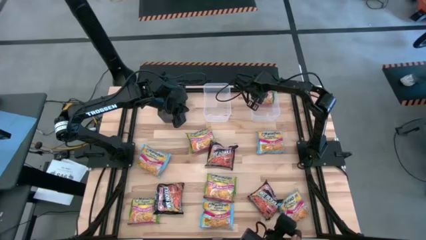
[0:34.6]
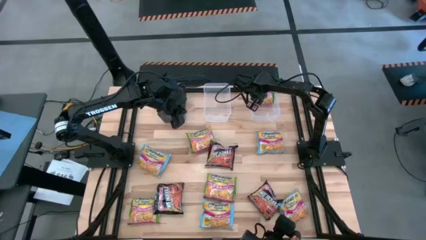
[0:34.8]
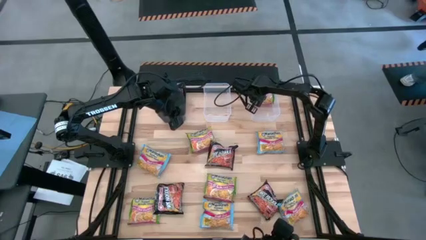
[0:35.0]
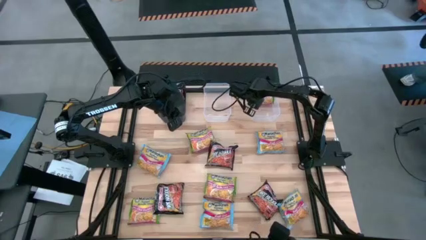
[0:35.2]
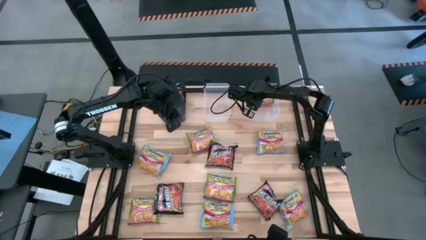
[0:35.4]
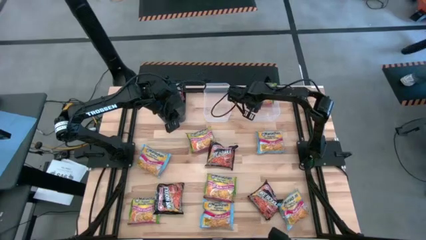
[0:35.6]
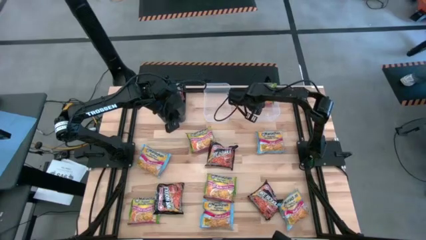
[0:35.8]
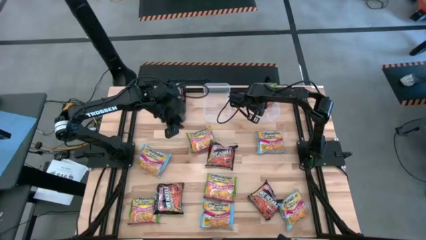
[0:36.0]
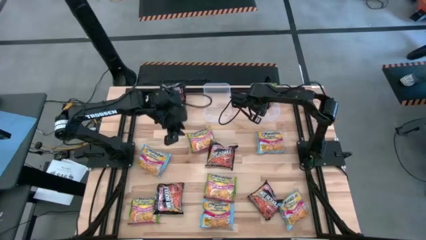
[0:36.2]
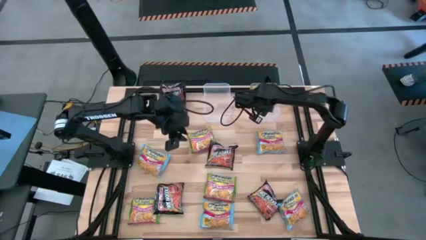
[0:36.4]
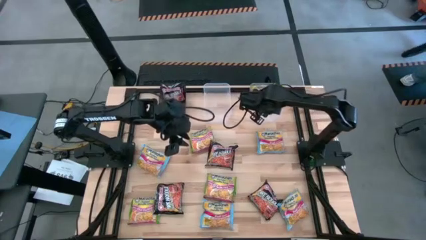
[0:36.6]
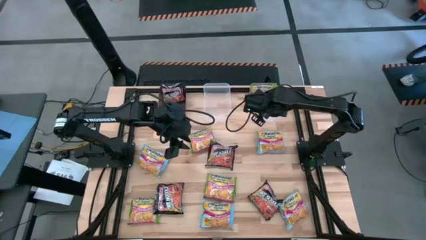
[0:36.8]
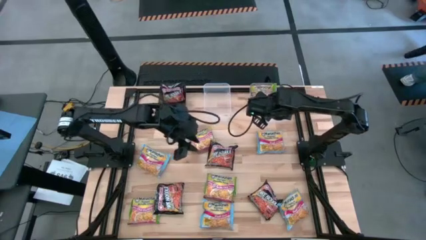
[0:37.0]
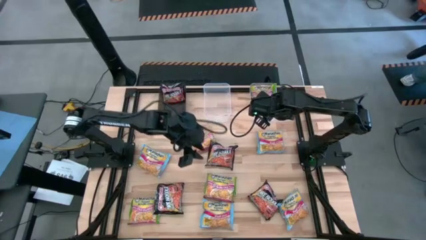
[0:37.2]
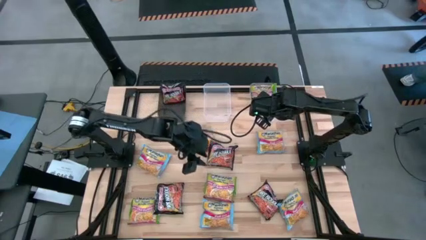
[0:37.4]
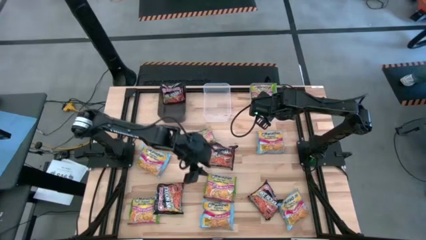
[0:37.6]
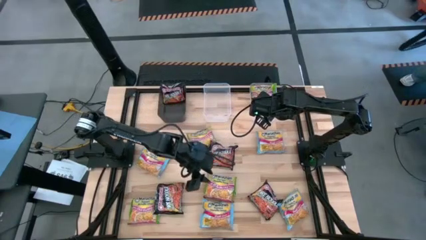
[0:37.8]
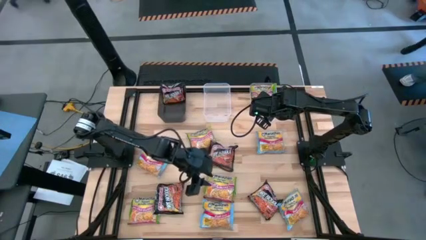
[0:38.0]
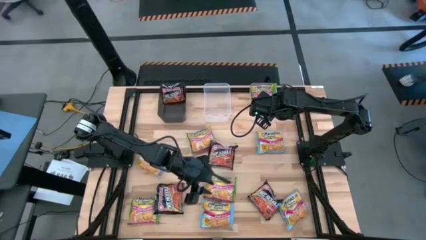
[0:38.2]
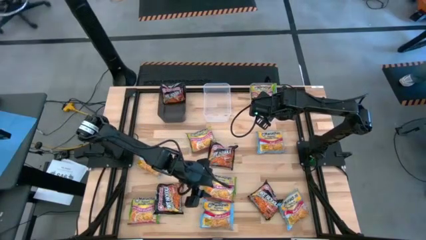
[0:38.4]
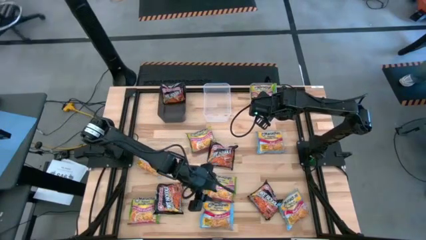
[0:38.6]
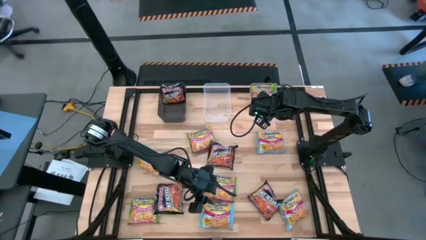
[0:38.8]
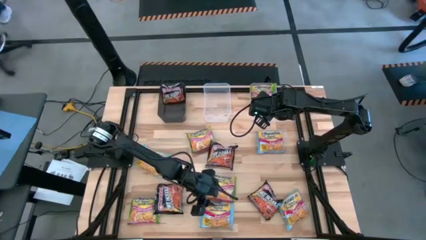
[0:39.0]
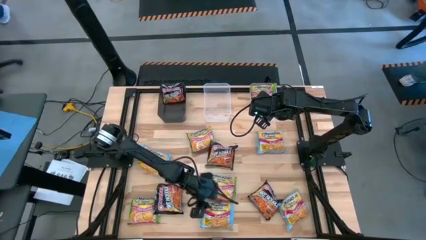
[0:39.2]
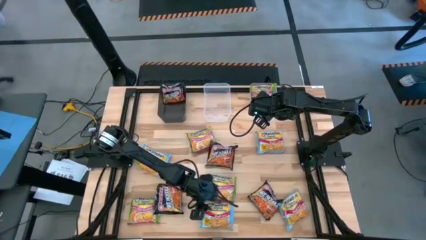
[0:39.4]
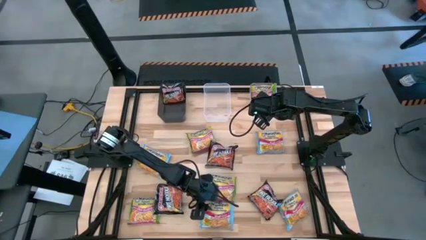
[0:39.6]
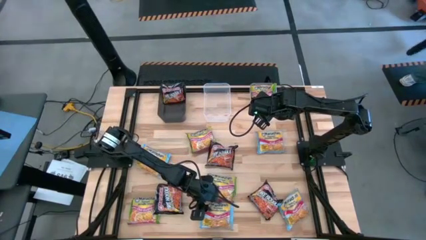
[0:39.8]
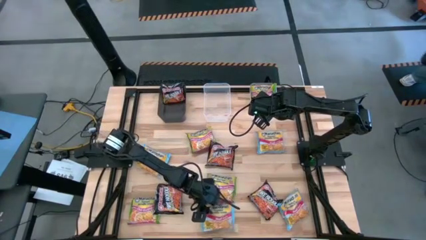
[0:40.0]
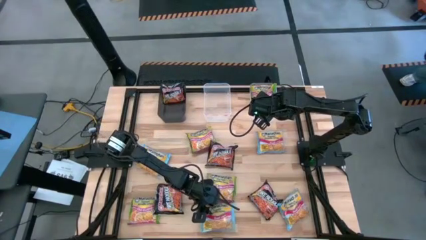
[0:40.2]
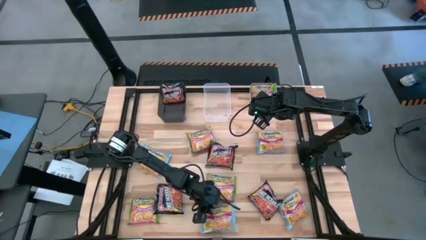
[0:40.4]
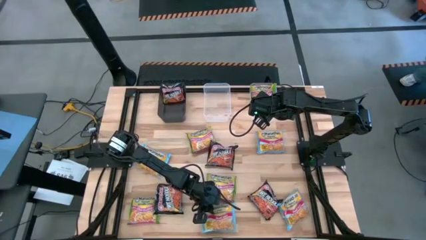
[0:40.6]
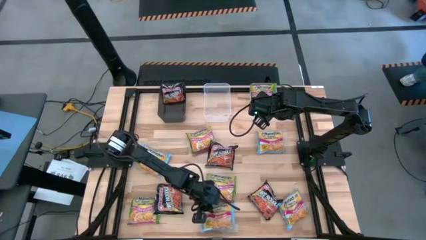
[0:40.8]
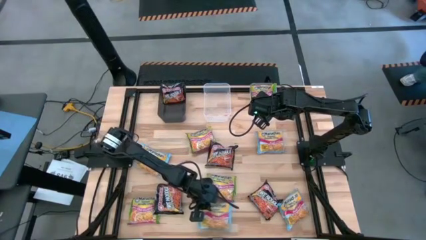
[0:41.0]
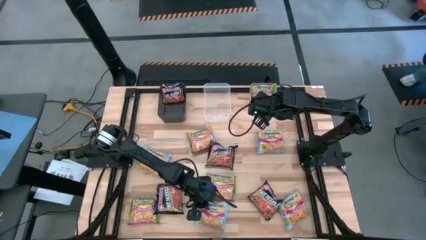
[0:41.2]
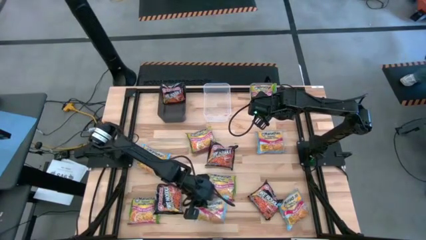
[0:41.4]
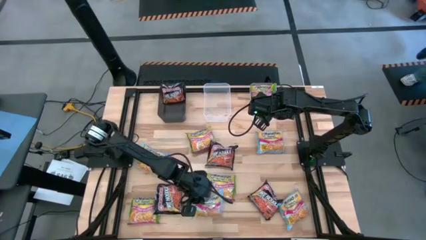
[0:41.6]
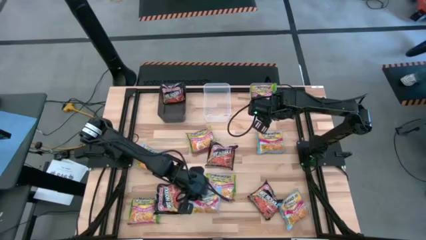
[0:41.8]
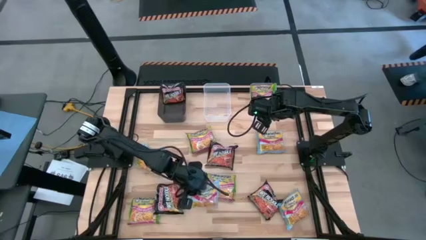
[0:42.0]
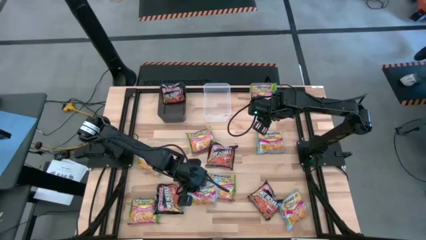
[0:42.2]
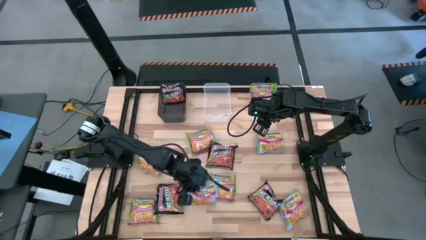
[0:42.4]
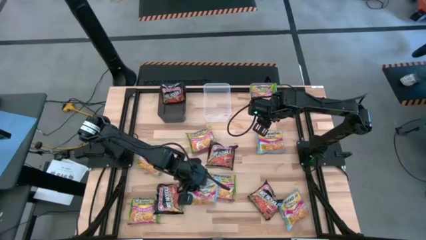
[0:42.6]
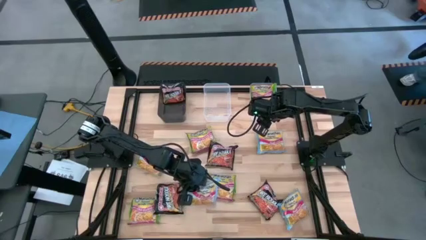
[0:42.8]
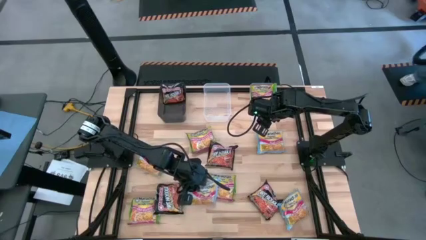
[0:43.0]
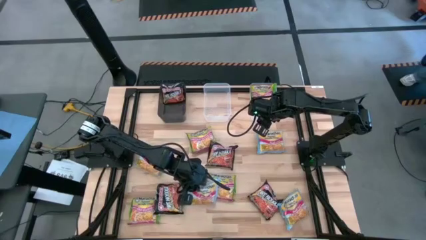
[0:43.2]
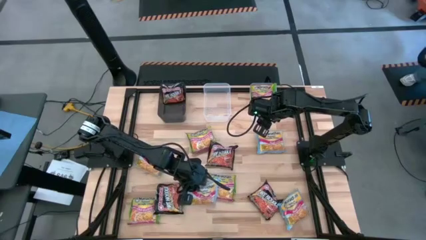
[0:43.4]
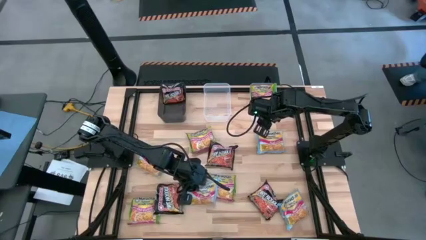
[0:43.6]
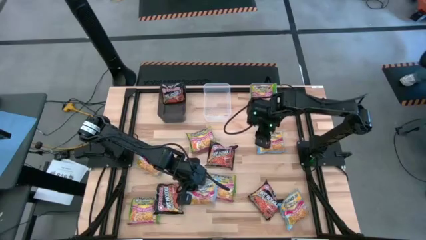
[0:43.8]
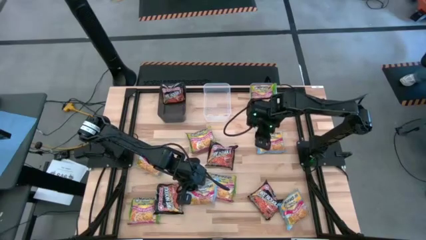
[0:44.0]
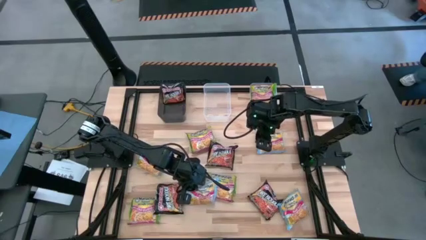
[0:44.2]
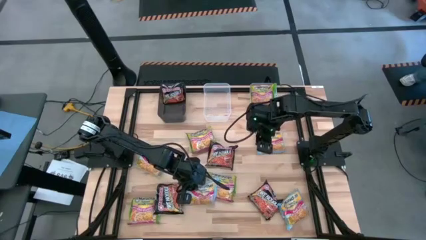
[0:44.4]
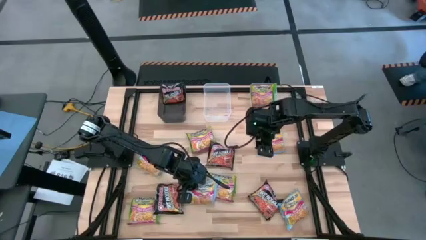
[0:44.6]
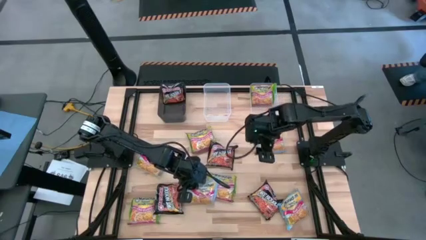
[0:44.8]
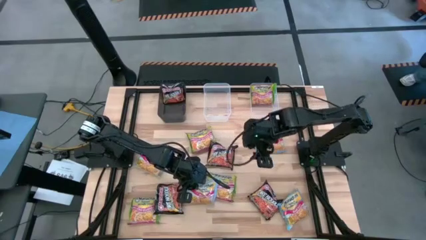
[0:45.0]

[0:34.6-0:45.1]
Task: Sort Maruchan noodles
Put the bottom middle blue noodle pack into the left transparent bin

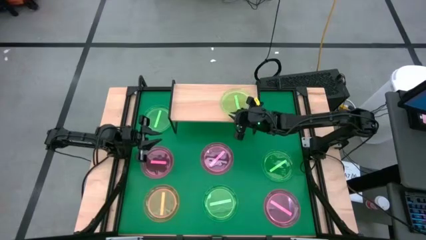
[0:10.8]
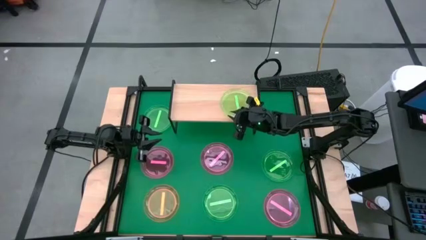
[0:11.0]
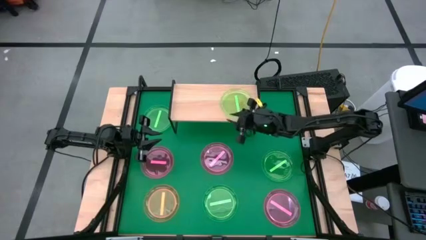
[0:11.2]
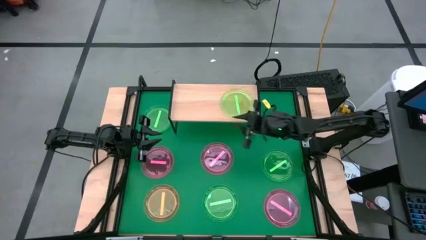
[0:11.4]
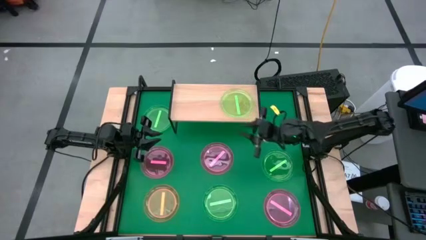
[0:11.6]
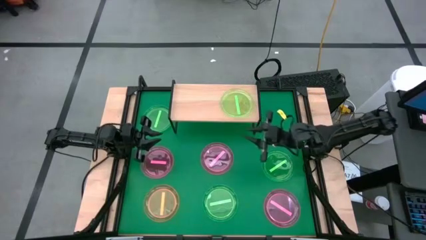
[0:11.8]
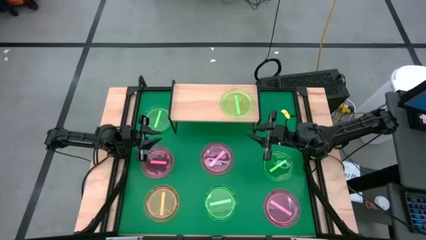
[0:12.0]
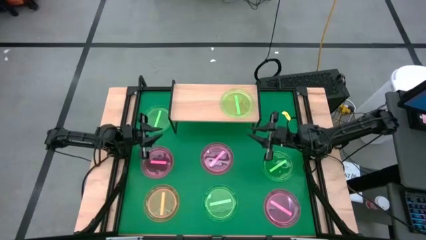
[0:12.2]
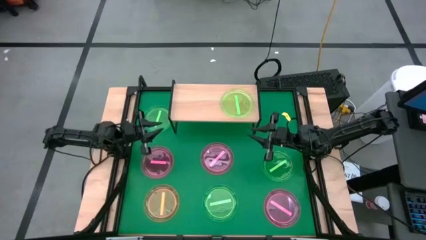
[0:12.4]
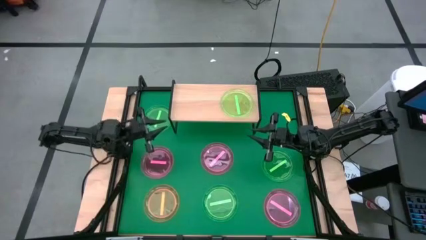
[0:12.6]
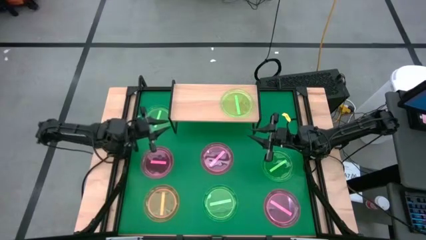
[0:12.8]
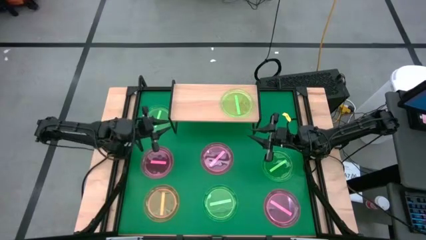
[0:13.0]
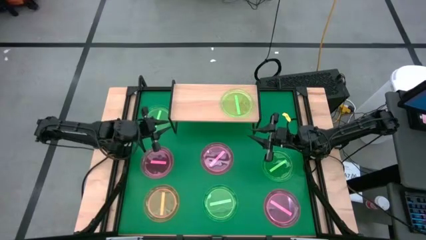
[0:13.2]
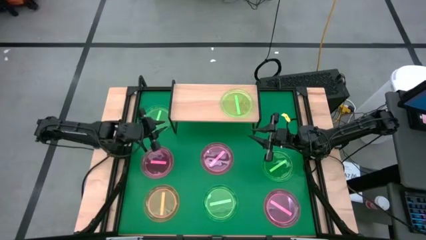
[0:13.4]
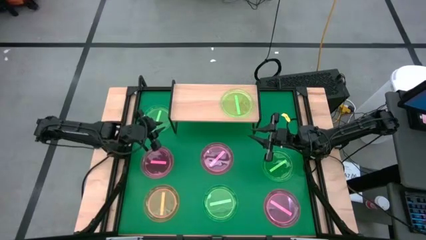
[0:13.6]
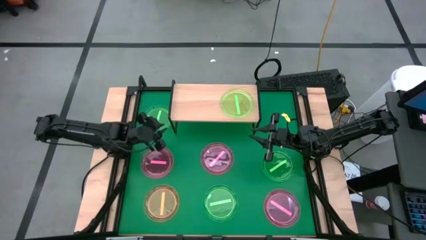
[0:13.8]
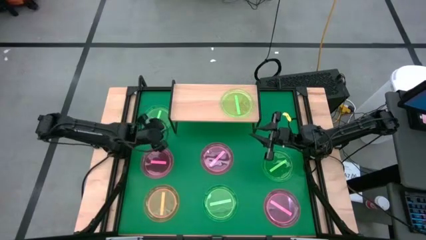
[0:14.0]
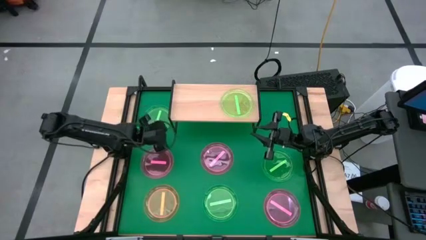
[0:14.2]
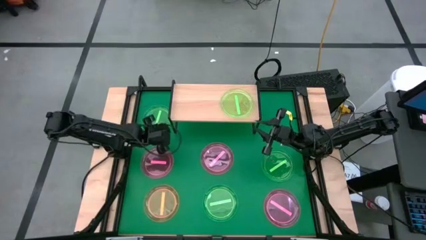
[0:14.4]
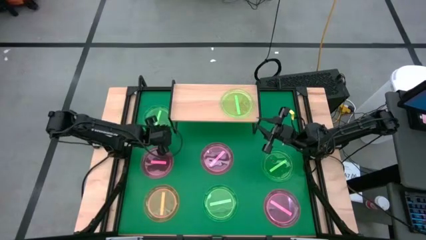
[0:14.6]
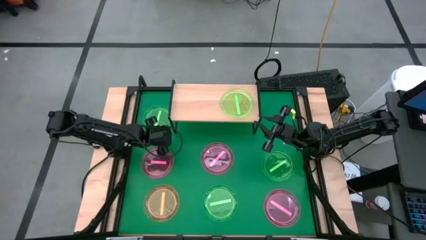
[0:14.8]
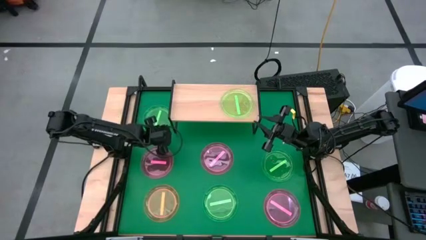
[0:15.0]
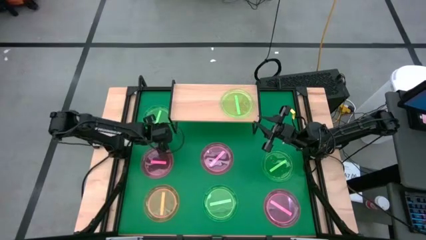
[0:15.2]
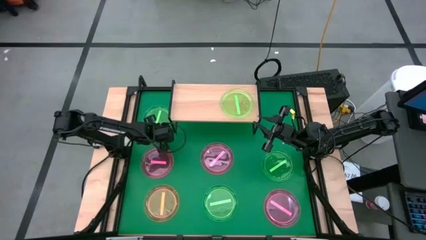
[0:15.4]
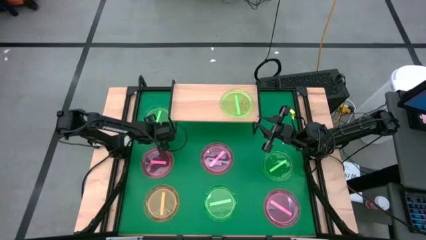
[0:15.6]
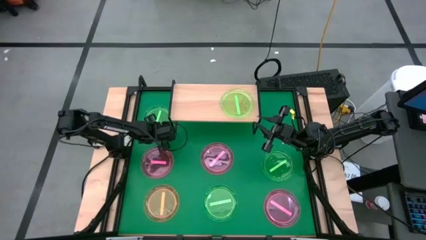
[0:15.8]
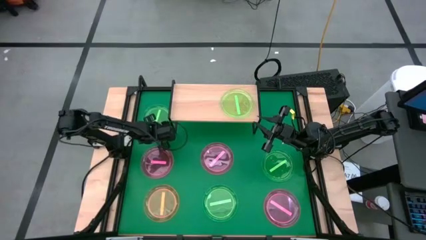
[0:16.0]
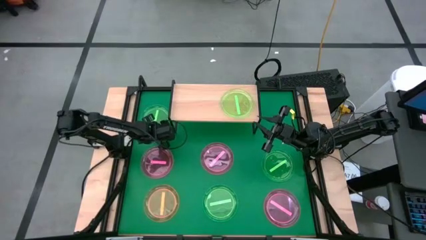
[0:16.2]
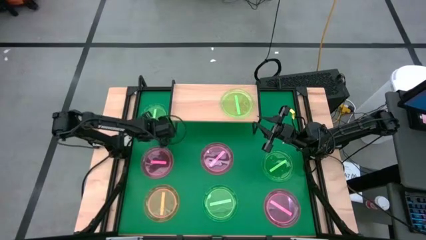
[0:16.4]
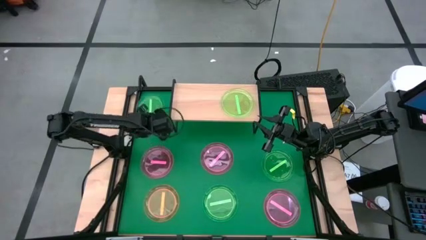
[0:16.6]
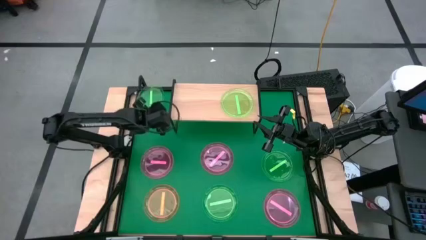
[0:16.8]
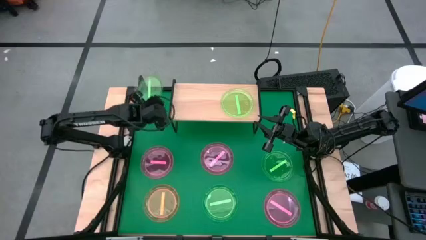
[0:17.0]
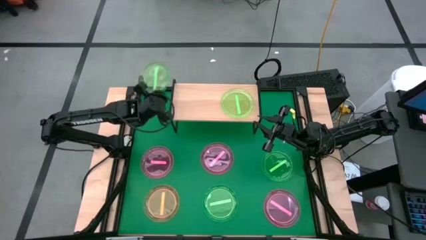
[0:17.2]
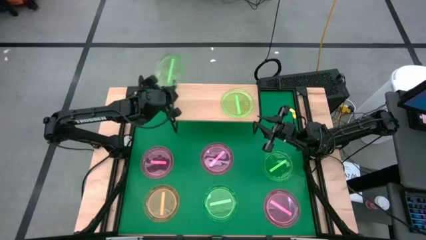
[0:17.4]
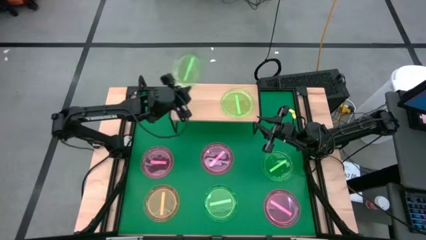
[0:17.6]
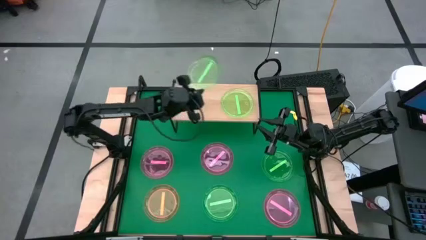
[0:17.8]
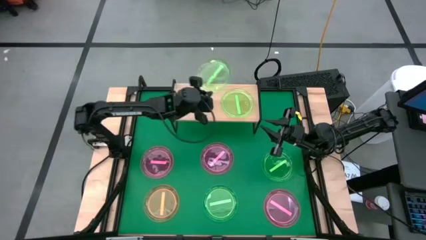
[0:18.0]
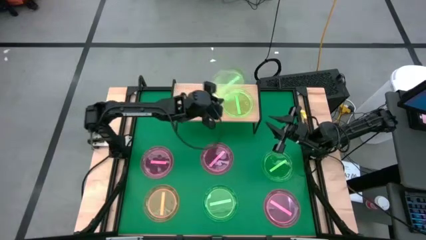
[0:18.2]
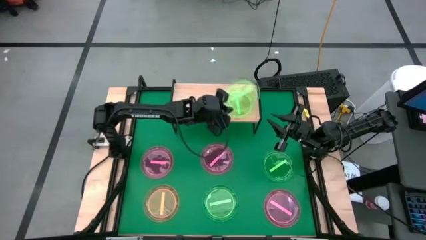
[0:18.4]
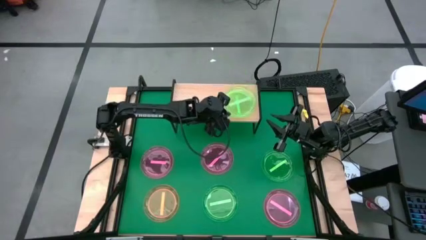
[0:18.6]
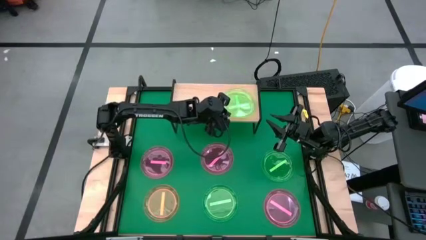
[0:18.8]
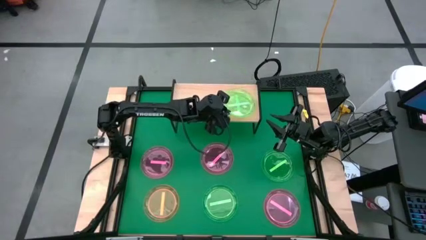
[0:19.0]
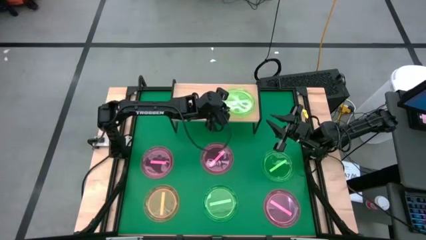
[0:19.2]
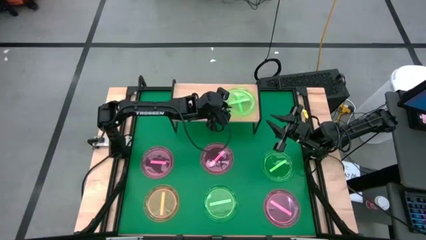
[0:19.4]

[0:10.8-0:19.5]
Task: Place and stack plates onto a shelf
Stack the green plate on top of the green plate on the shelf
